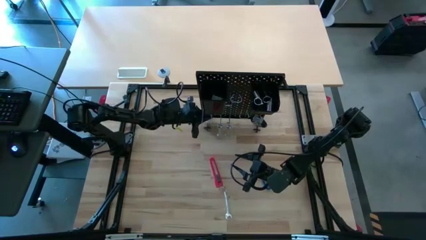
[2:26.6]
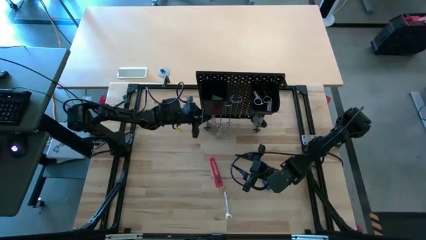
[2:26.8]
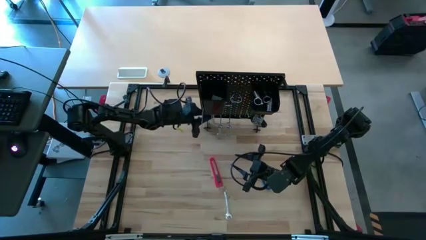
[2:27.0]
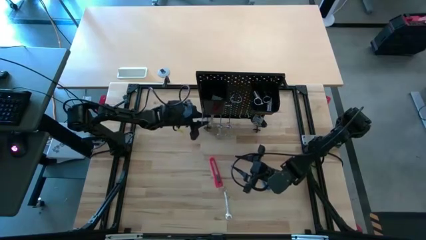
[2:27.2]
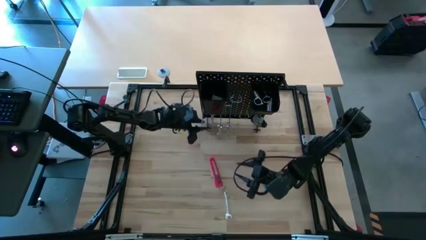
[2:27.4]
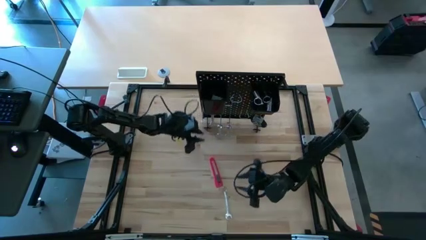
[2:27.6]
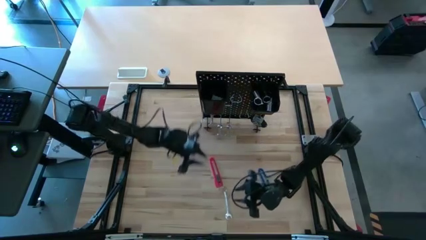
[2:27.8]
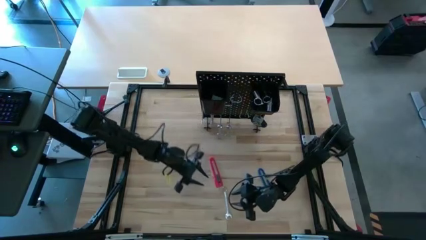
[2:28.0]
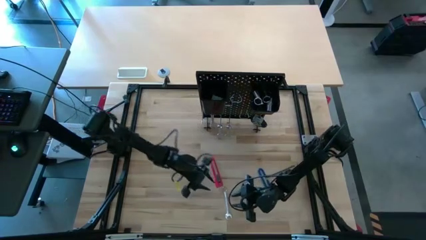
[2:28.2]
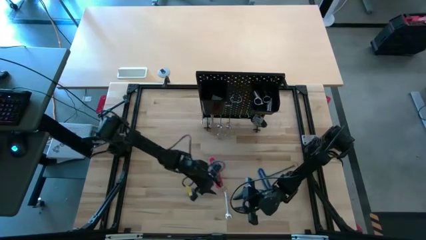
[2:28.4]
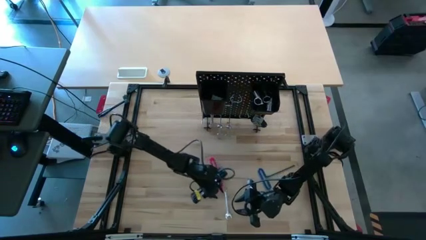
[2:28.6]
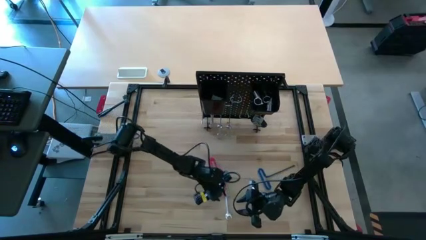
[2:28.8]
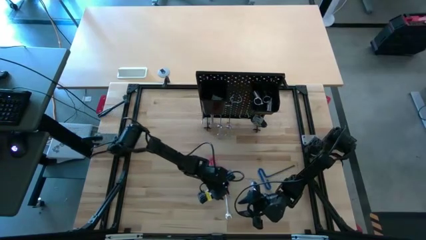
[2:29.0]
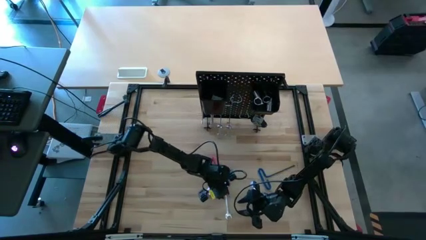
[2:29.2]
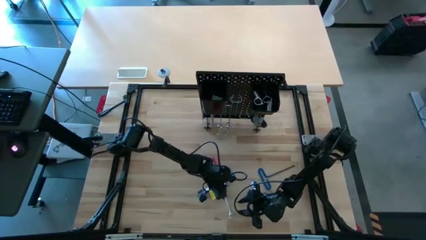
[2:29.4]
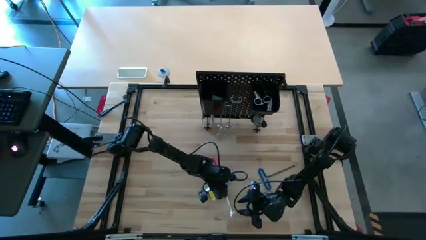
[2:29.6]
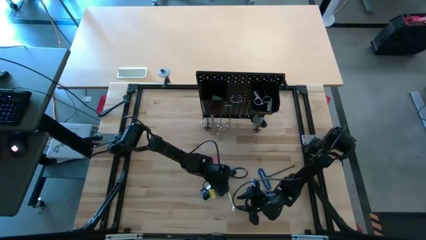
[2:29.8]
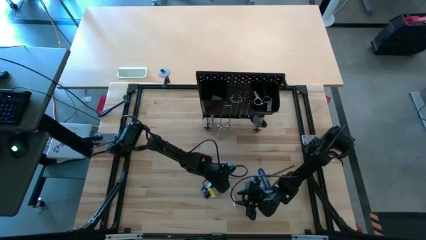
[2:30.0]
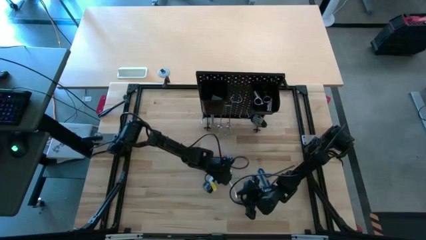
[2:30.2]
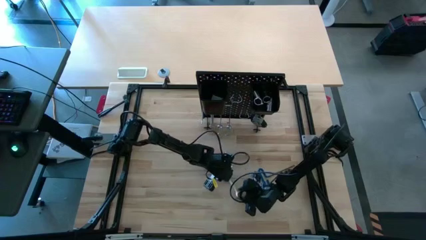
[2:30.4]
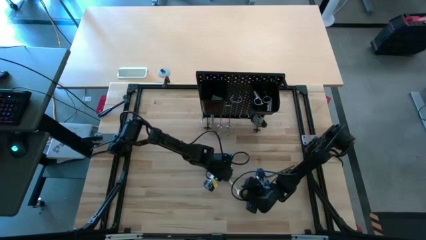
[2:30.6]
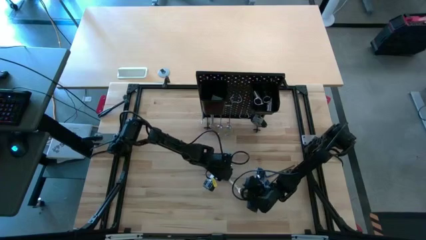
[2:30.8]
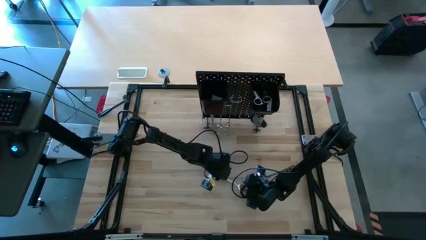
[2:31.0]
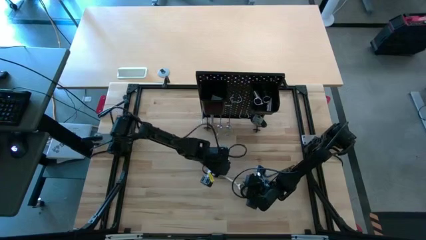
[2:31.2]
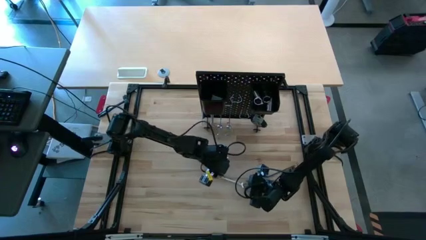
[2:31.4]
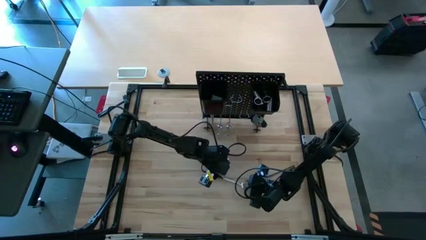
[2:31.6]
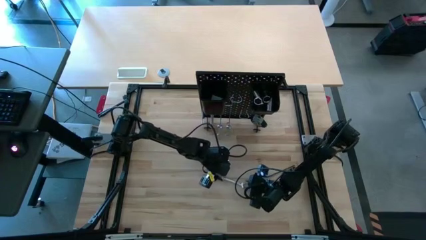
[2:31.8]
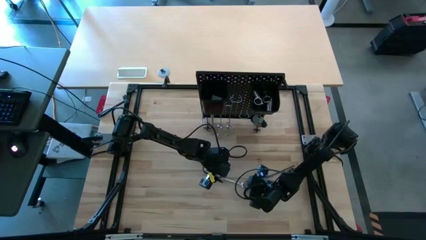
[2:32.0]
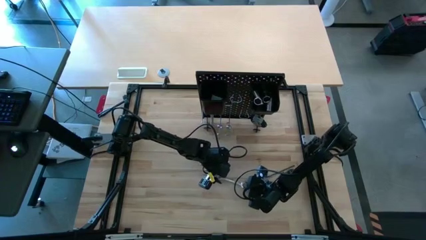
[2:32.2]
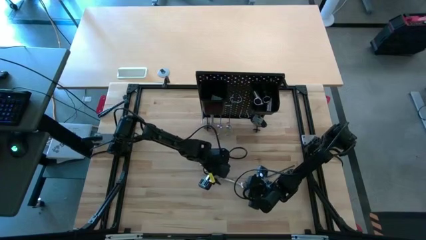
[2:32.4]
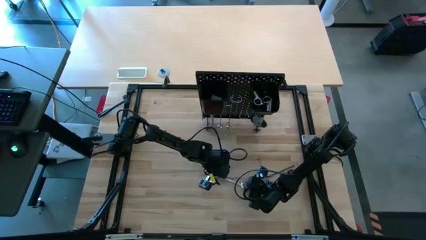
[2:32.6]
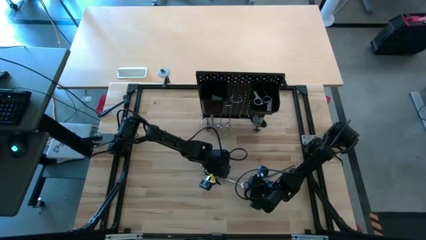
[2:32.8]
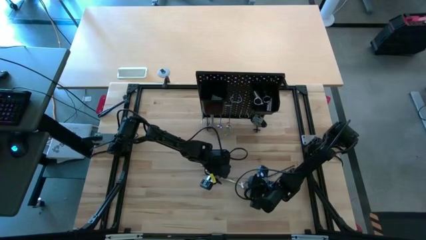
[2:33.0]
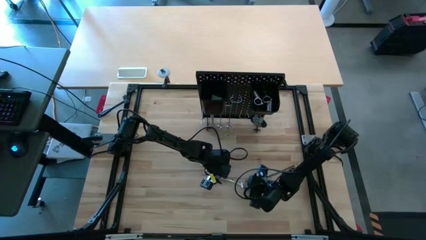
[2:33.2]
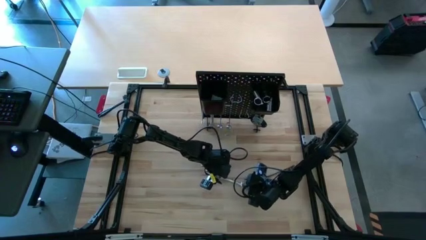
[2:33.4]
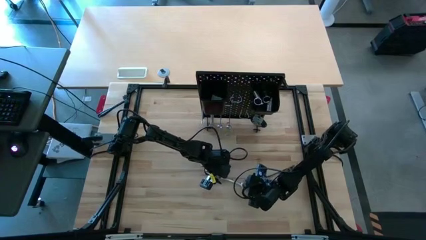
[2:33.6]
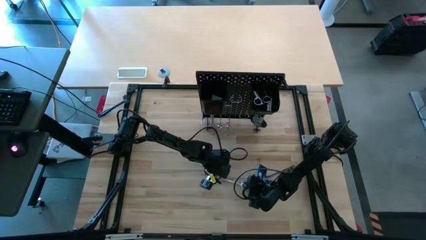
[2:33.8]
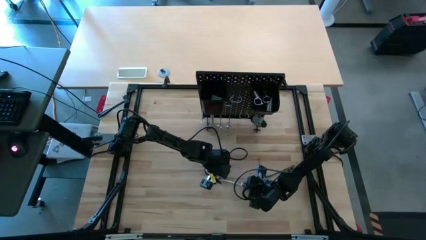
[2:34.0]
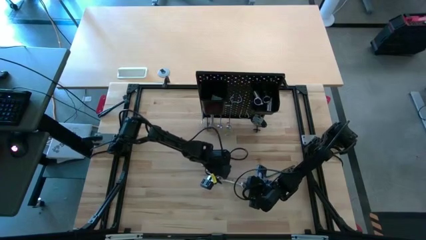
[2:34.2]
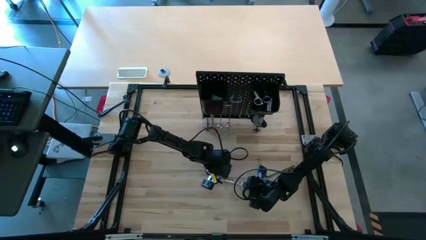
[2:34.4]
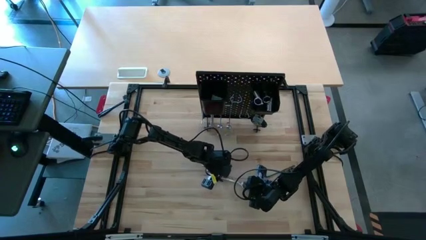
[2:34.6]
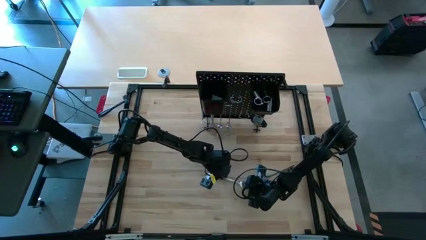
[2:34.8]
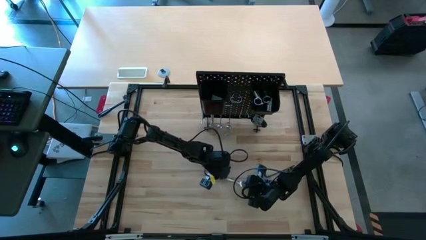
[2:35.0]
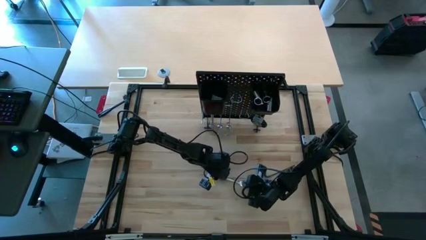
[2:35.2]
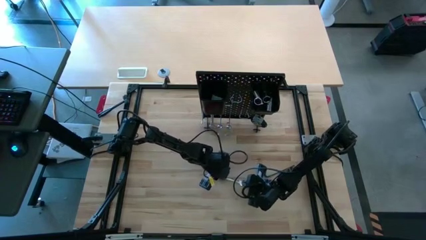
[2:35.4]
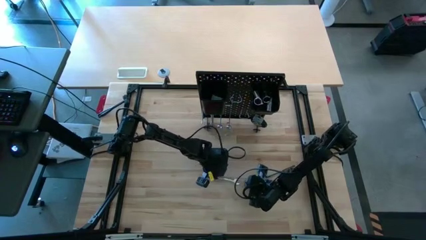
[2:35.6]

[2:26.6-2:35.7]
Task: Hang tools onto peg board
Hang the wrench on the peg board

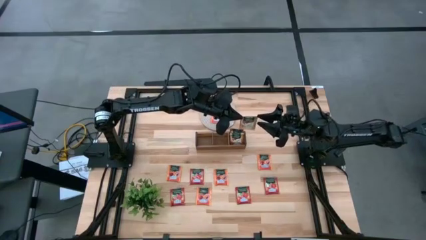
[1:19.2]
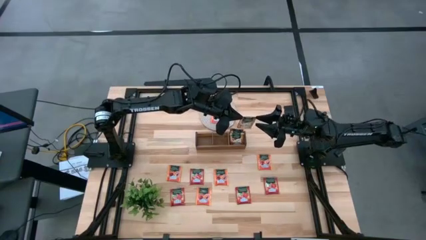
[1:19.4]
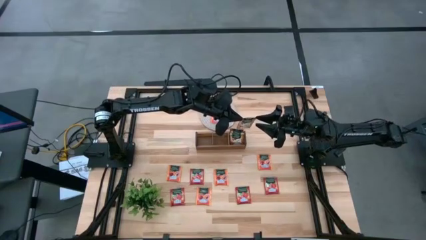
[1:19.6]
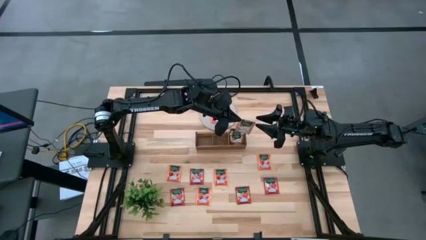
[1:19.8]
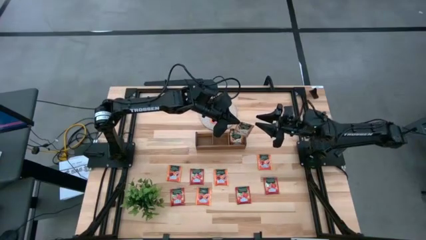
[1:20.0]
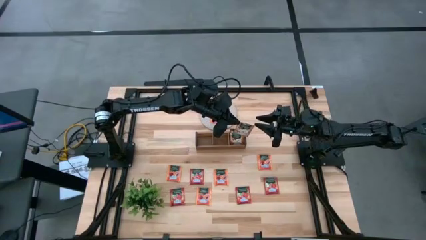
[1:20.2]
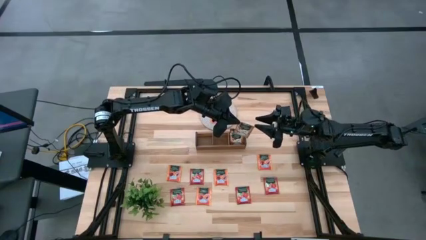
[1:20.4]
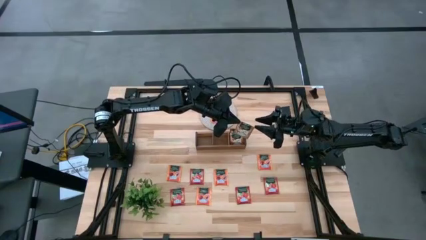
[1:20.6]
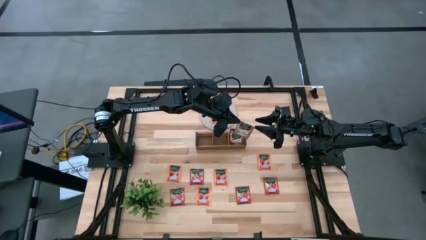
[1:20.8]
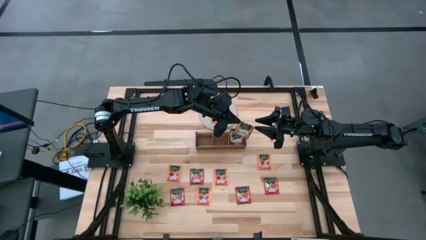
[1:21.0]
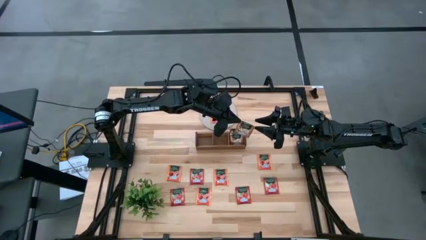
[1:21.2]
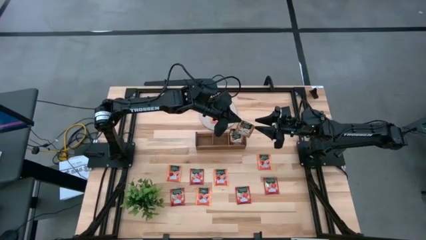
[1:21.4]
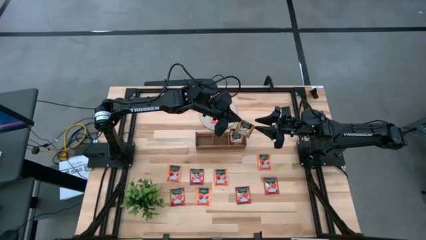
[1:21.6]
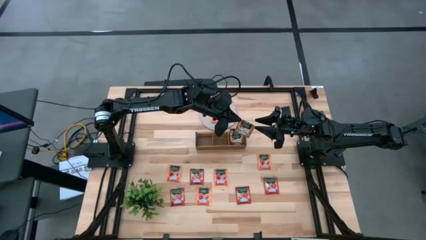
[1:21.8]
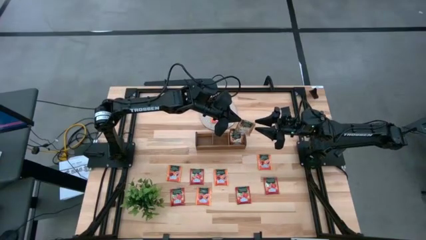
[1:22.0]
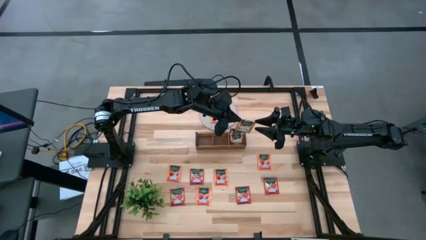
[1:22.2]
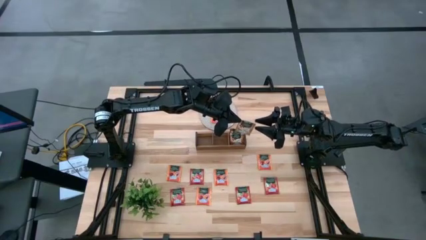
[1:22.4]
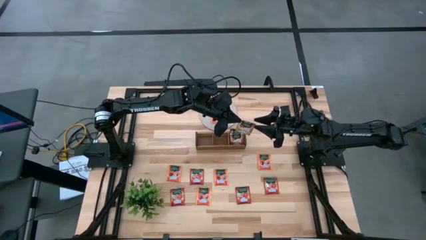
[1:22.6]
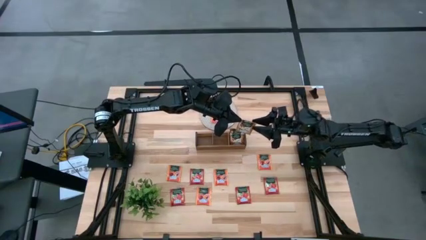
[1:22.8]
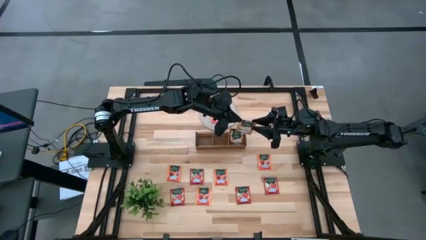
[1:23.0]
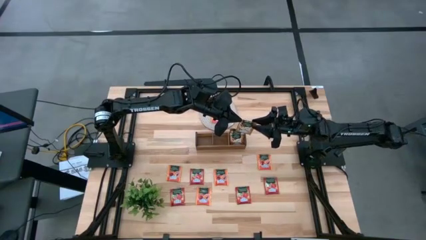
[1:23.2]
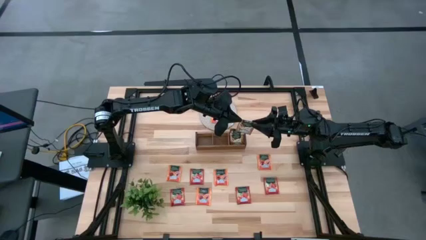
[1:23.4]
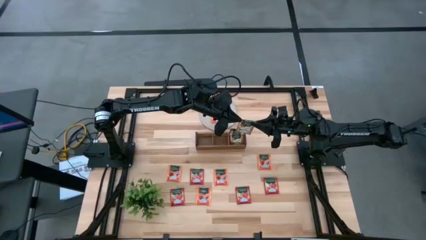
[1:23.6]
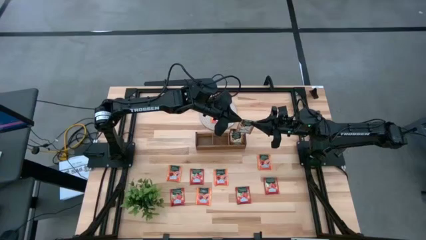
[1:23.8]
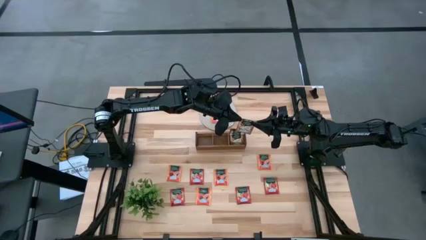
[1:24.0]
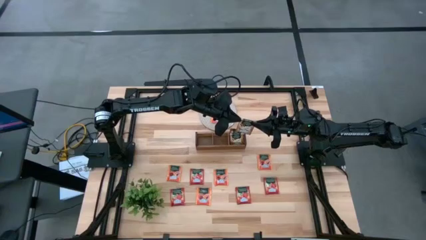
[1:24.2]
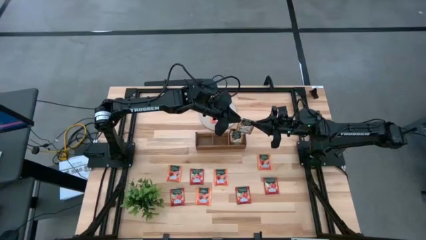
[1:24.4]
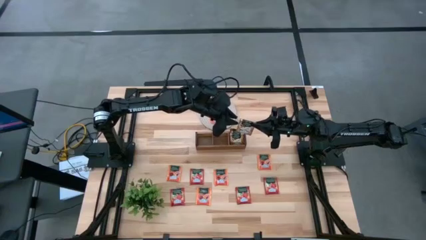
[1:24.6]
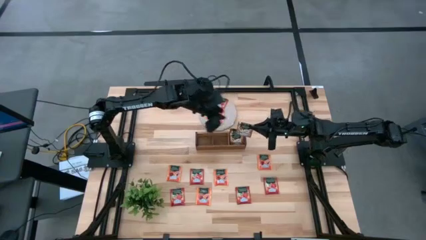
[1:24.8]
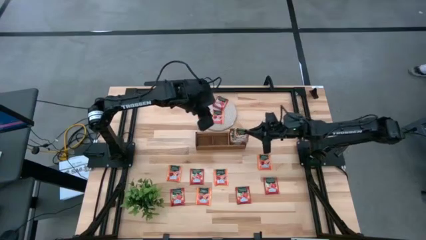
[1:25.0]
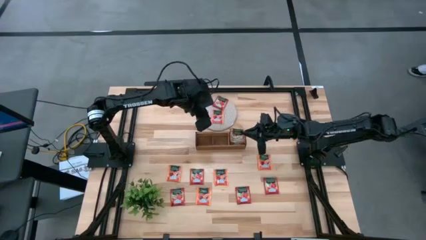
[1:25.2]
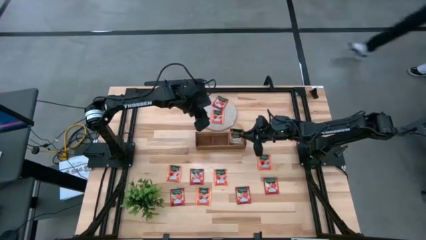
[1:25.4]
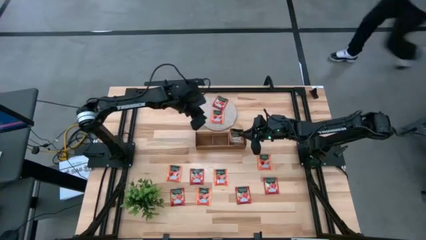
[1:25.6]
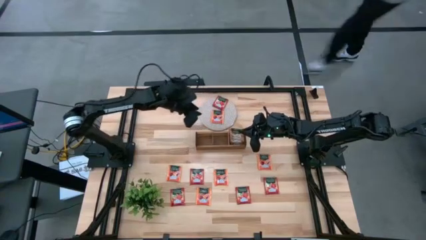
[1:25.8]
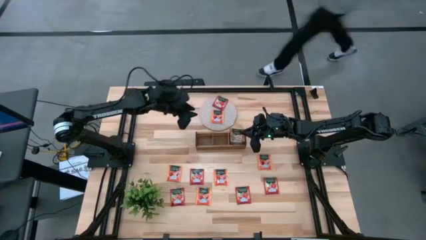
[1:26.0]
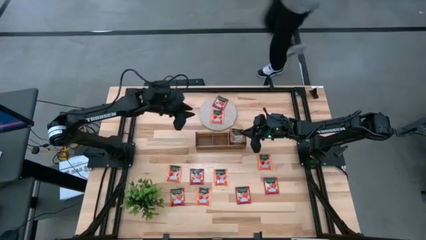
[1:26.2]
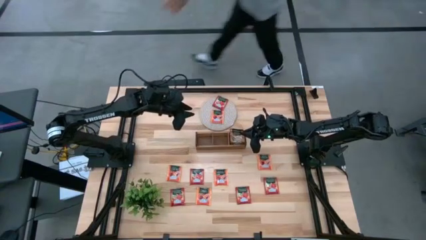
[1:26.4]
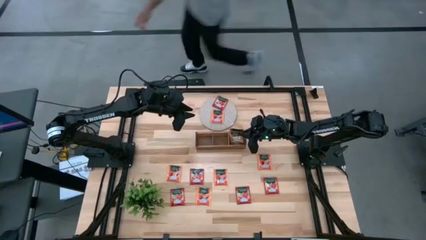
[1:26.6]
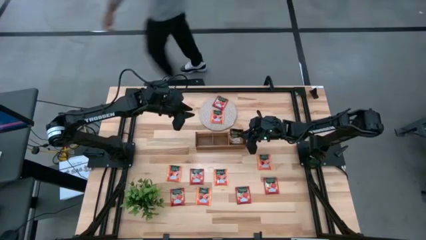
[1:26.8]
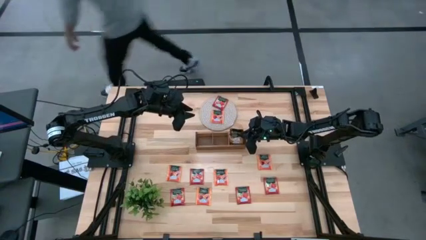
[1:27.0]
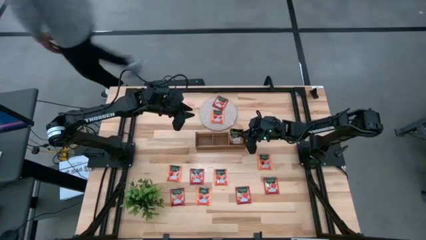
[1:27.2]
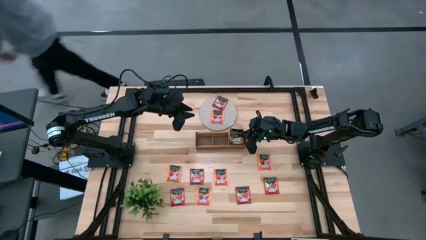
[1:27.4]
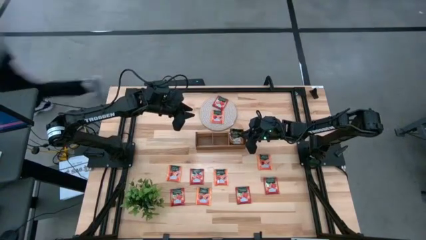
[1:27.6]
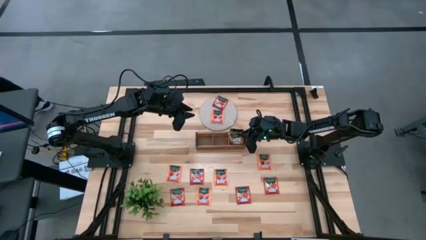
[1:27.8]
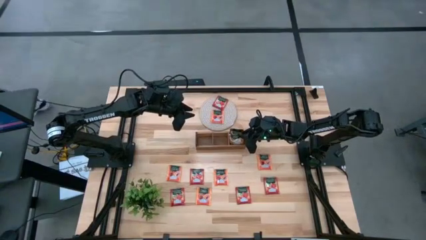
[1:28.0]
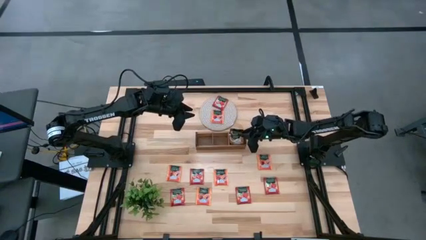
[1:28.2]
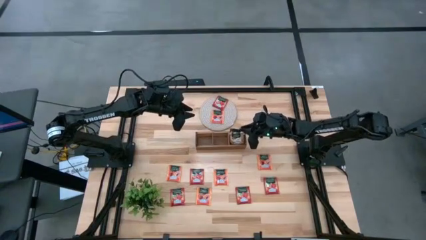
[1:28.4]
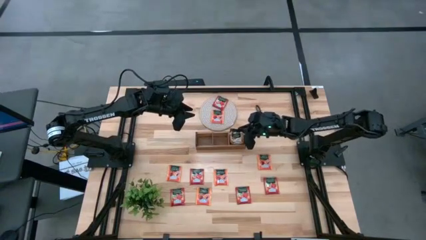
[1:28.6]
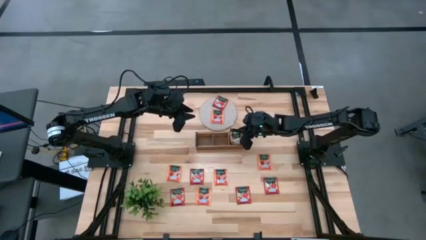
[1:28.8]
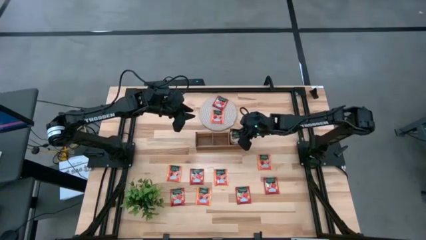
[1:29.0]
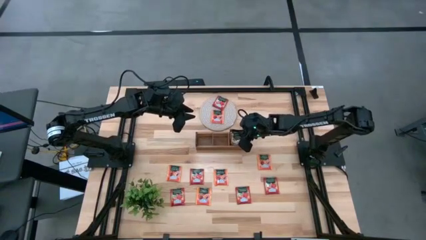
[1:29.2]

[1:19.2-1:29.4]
Task: Pick & Place Tea
Put the brown tea bag into the right section of the wooden organizer
